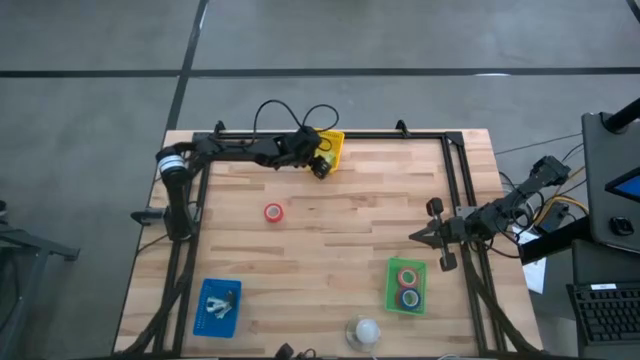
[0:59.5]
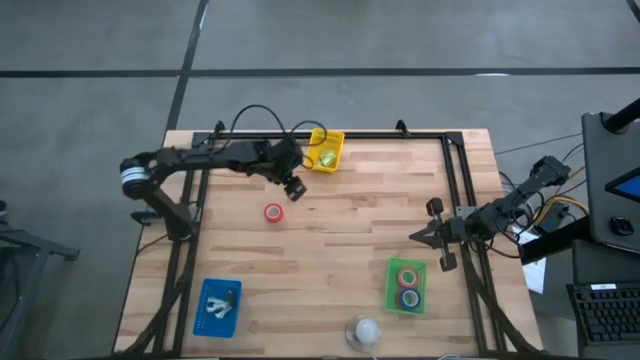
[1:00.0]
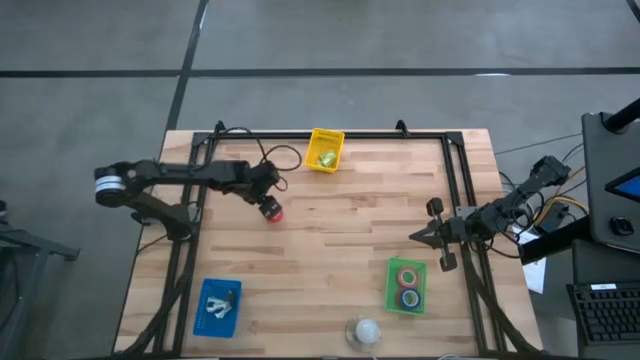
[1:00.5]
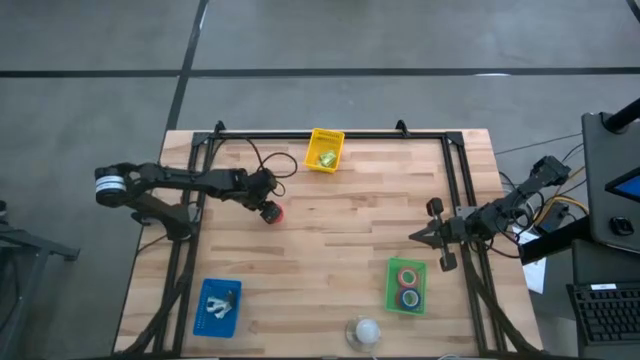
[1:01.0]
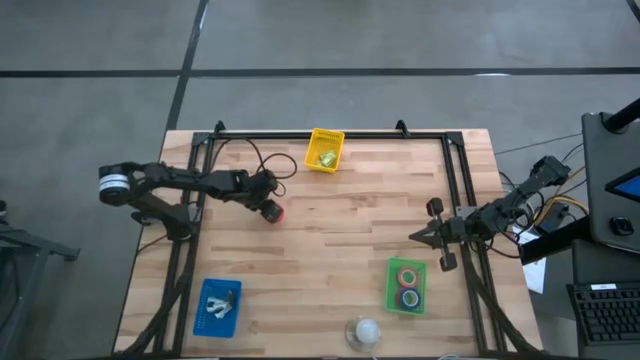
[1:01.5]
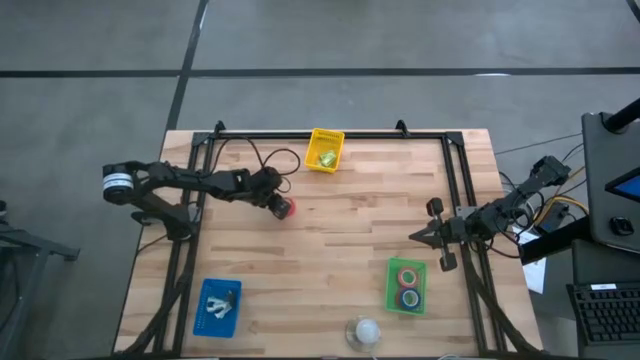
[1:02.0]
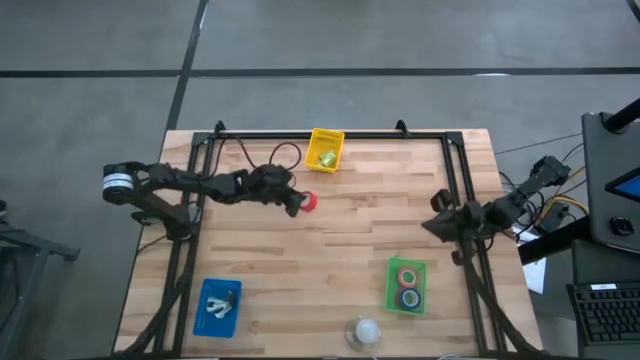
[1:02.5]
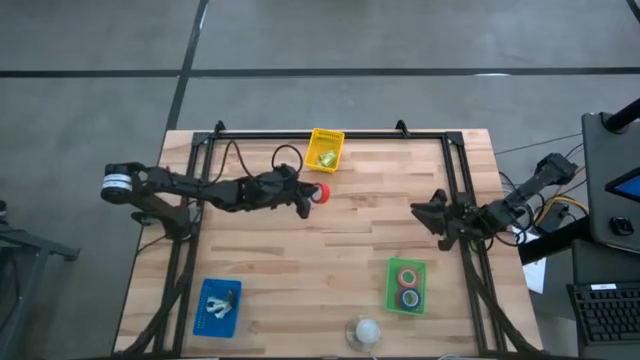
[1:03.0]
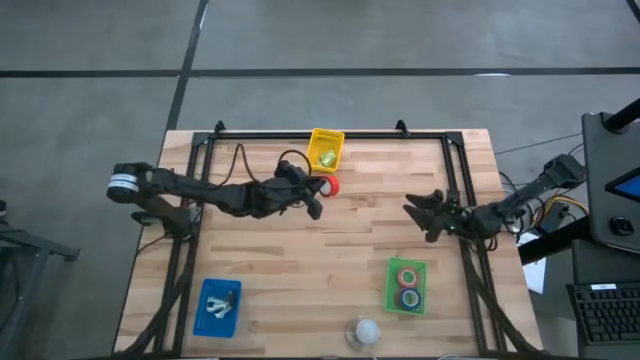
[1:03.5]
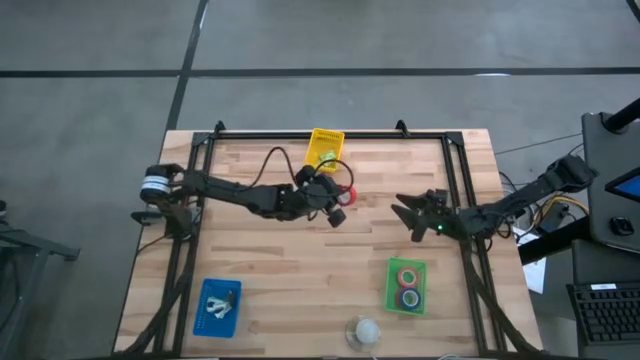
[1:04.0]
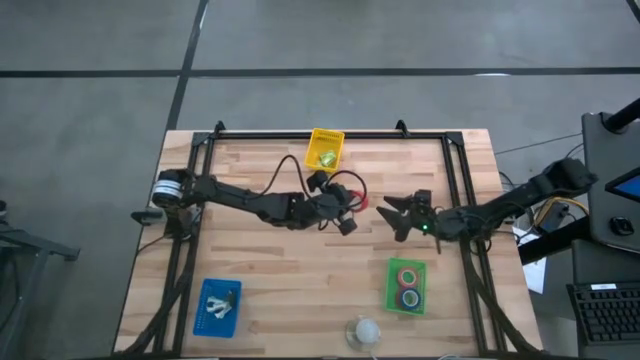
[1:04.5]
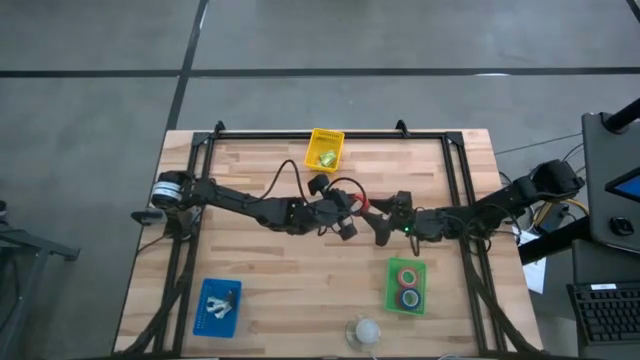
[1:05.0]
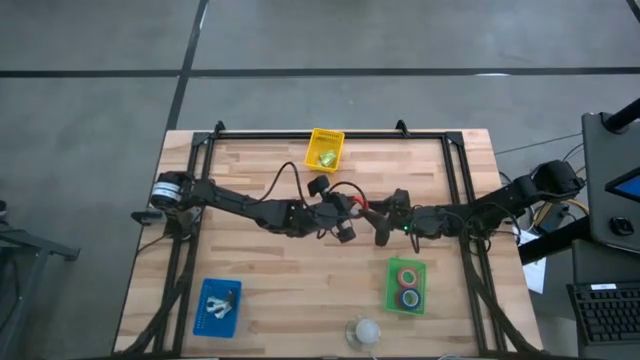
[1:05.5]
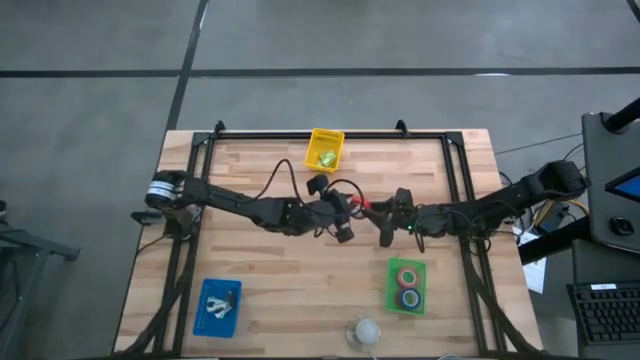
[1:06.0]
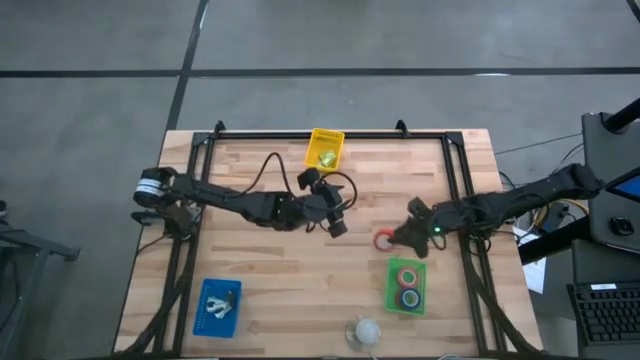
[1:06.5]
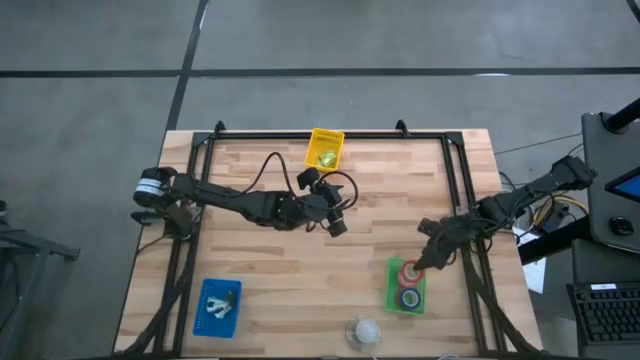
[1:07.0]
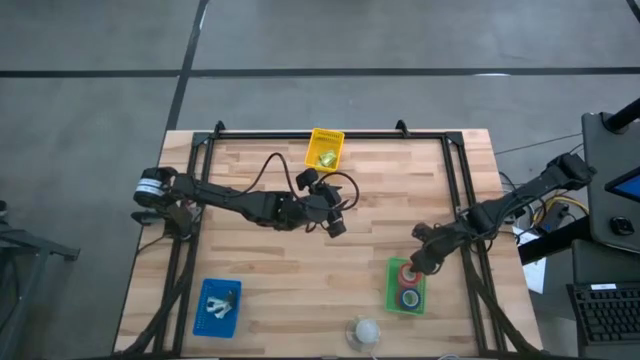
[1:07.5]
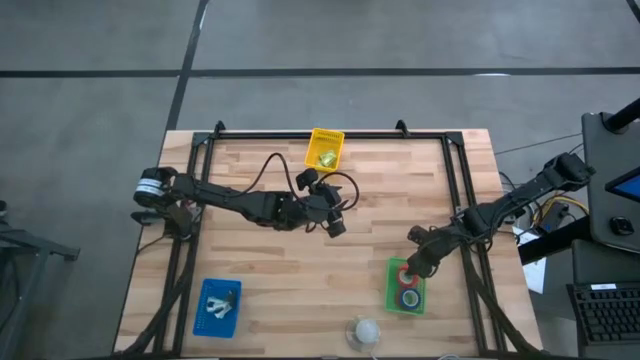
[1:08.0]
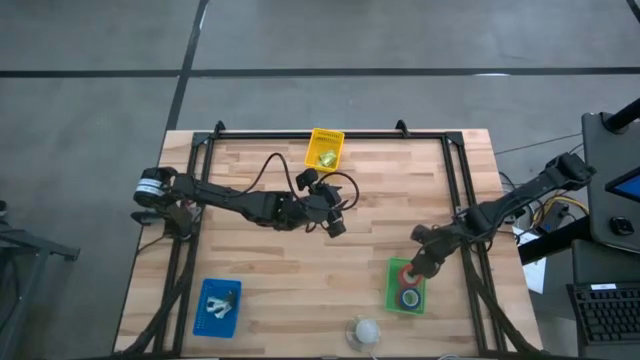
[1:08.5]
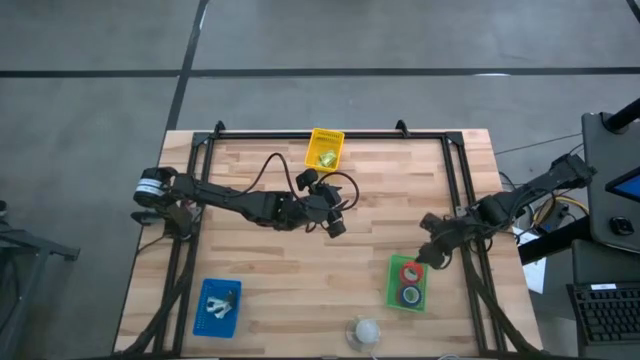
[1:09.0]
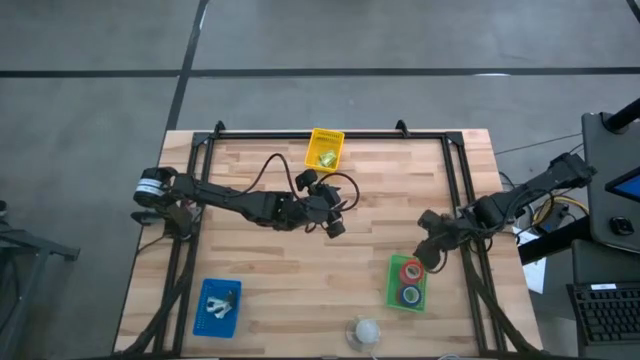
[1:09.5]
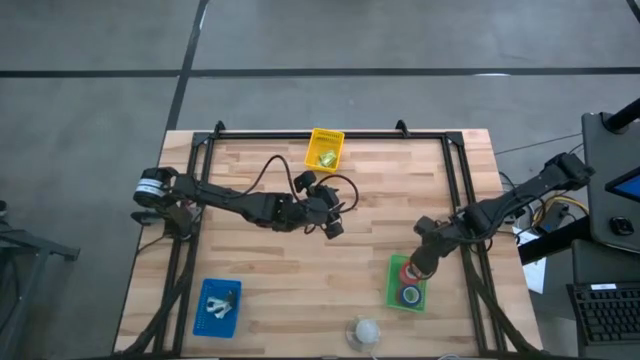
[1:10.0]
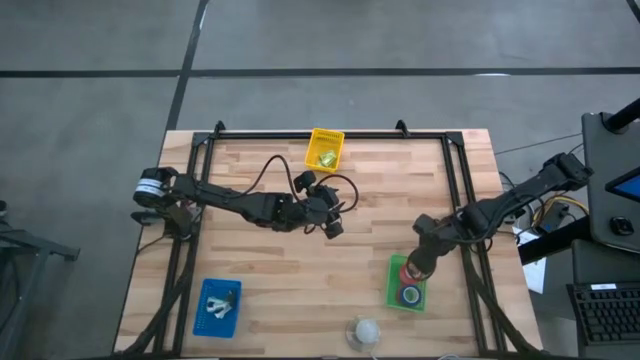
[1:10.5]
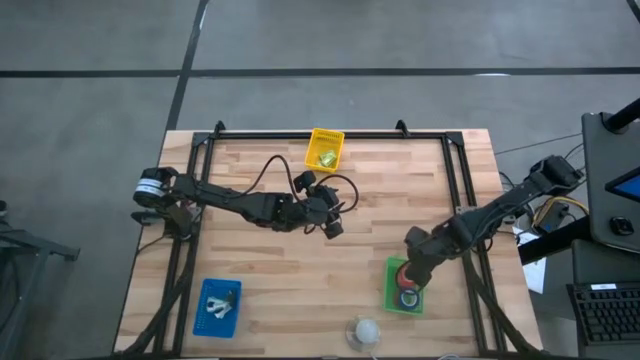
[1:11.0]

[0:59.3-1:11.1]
Task: Pick and place Stapler, Stapler remover, tape
Put the red tape into the green bin

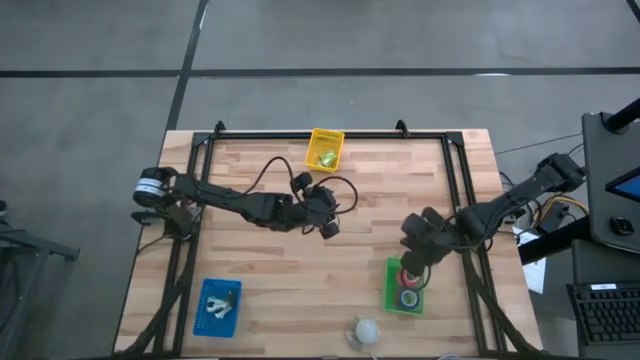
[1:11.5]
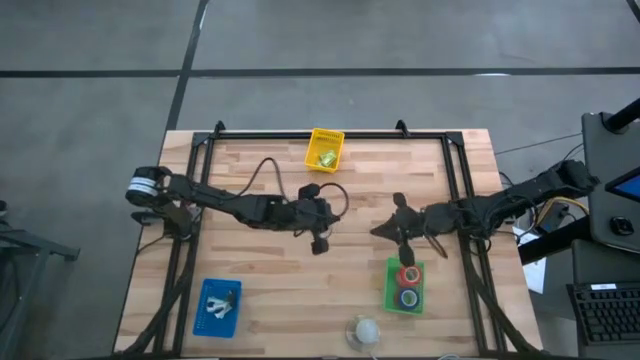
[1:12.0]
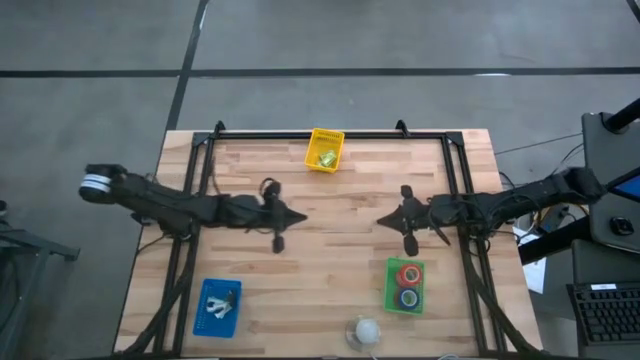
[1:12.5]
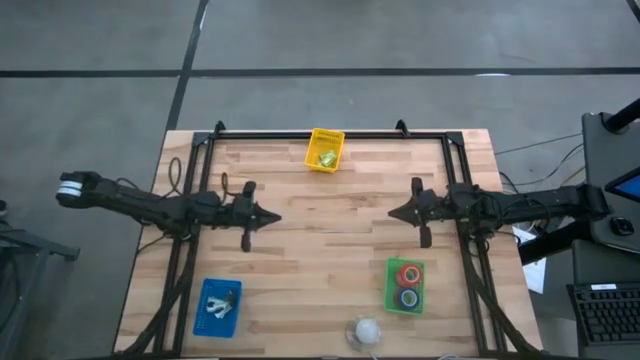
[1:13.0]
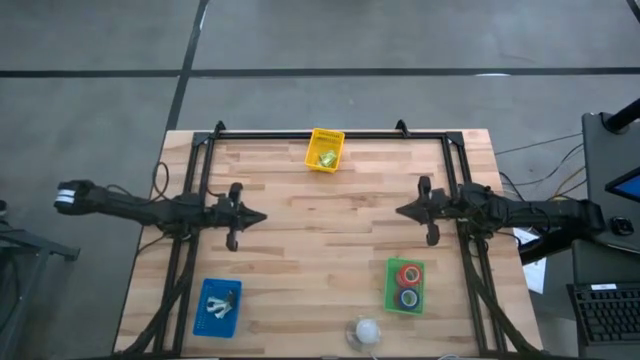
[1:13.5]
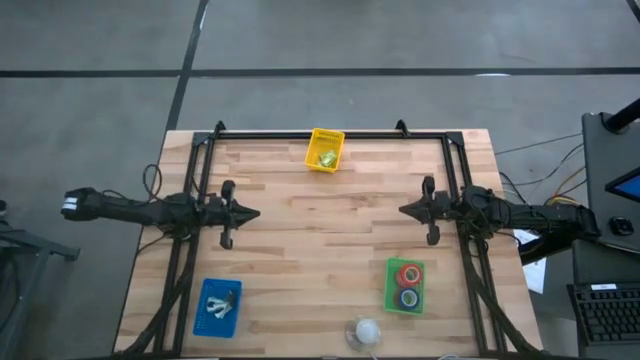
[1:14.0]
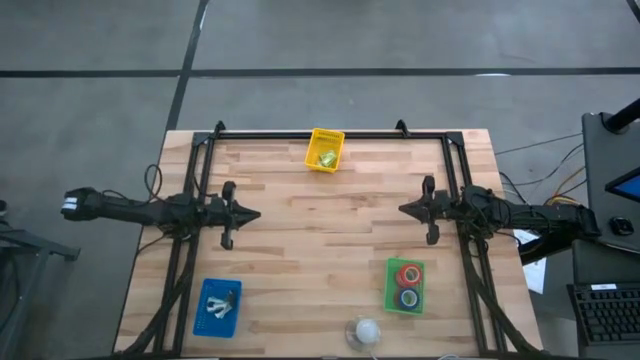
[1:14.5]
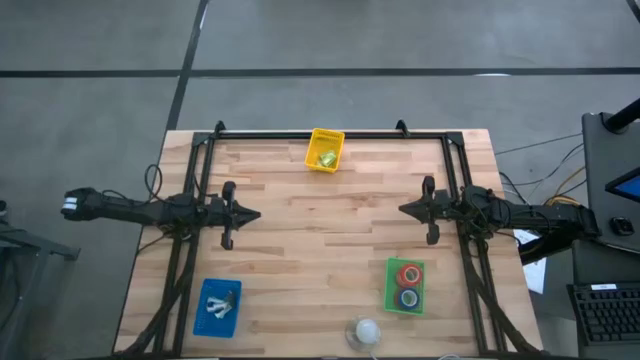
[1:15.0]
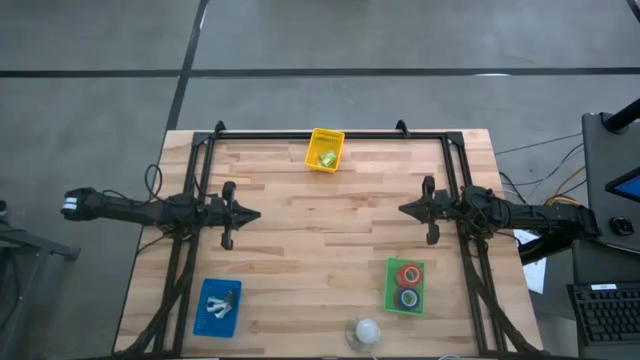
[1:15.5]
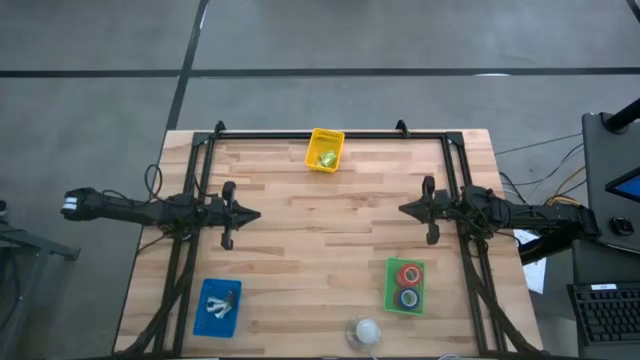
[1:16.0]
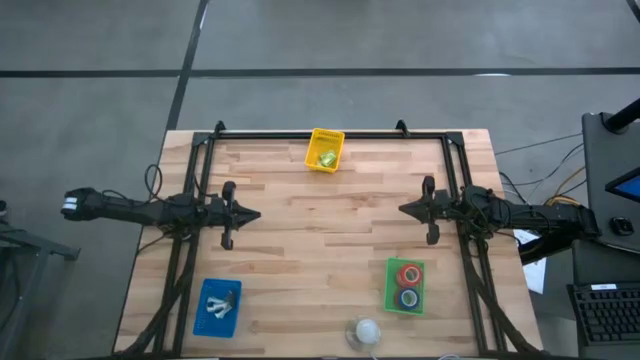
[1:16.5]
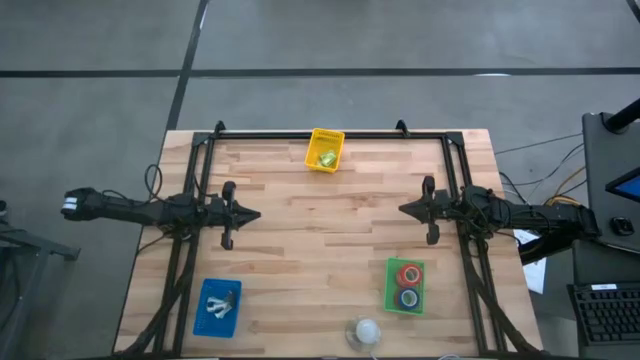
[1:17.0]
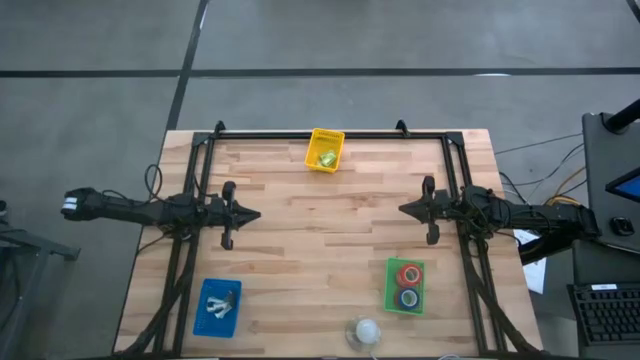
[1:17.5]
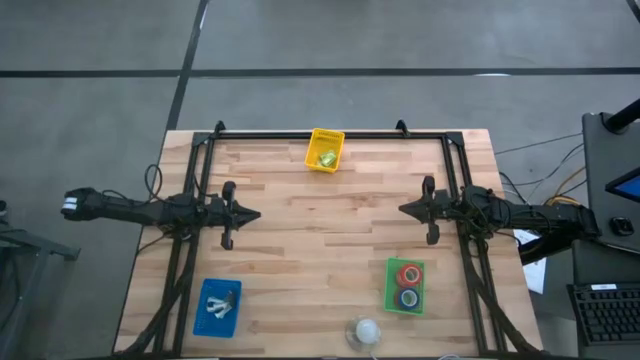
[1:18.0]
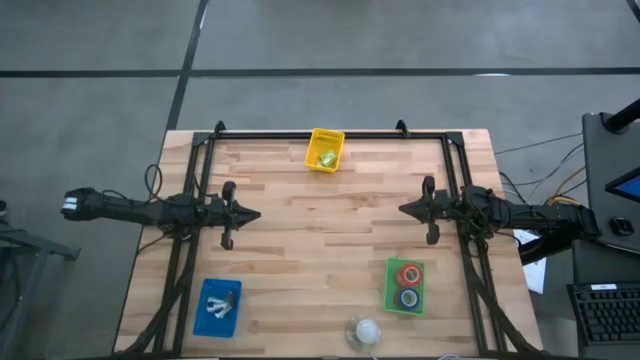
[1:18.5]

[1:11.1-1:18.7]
Return to Home Position

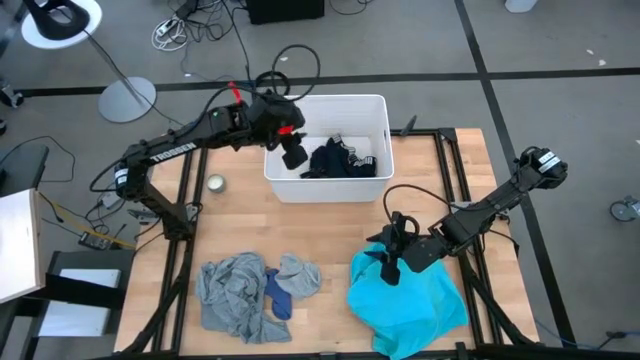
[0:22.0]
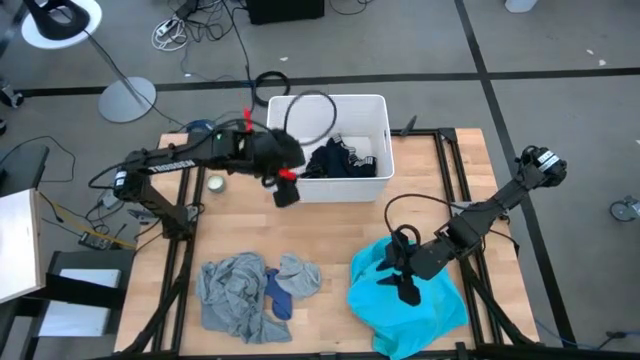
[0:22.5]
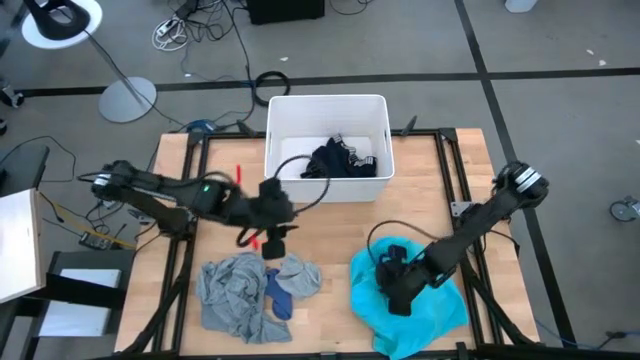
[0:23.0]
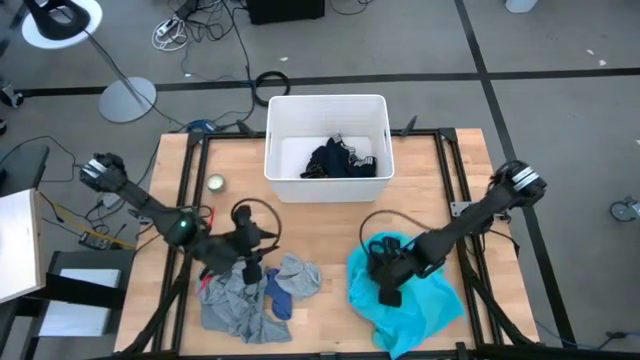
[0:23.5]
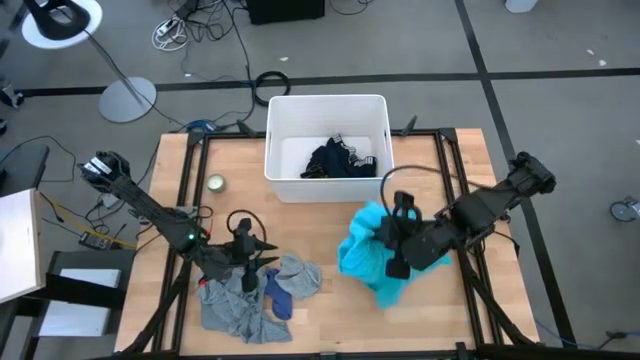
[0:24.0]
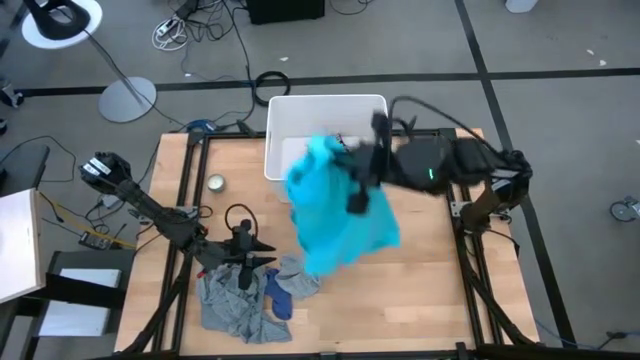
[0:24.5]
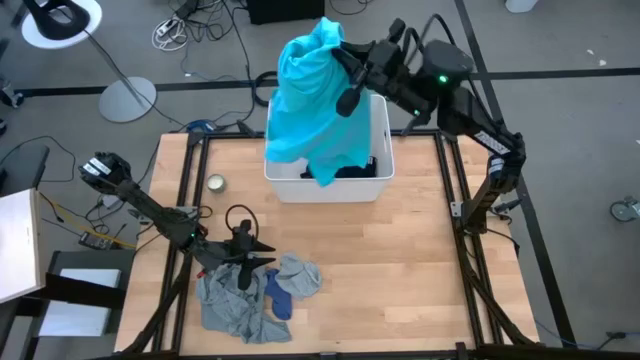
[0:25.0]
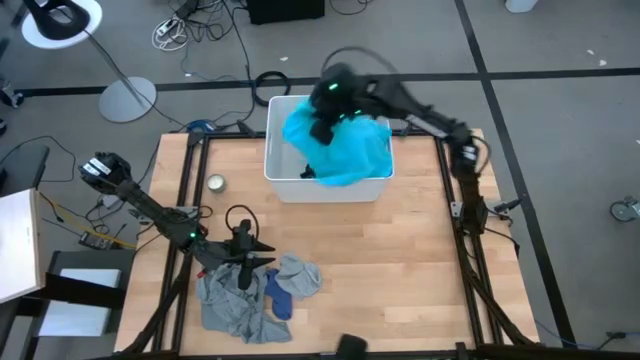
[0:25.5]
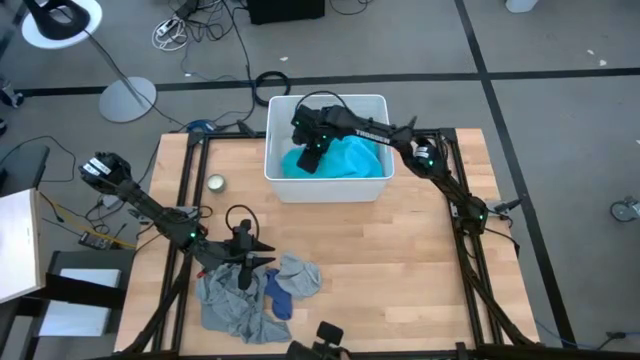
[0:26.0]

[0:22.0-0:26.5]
Task: Sort clothes
Put the blue short into the white laundry bin
